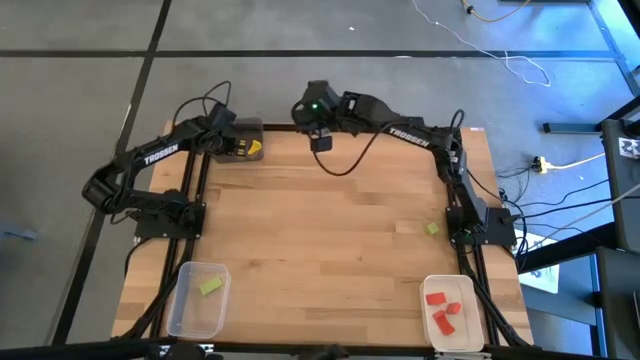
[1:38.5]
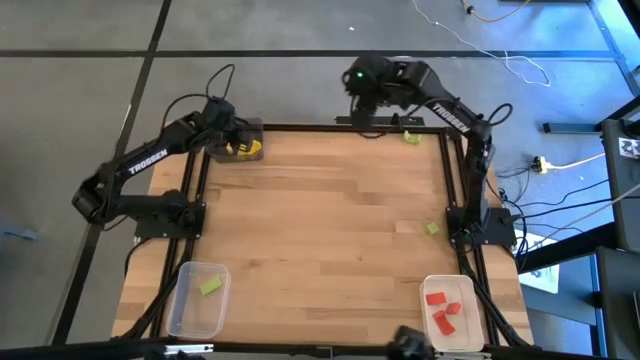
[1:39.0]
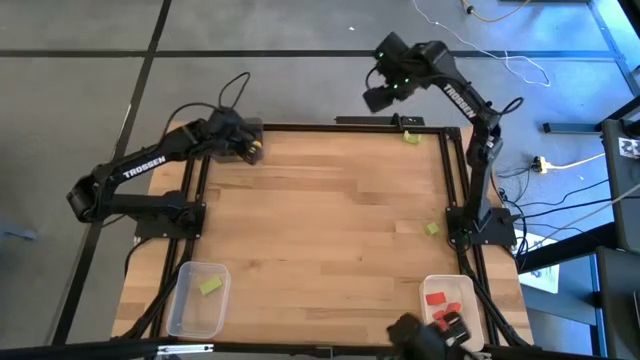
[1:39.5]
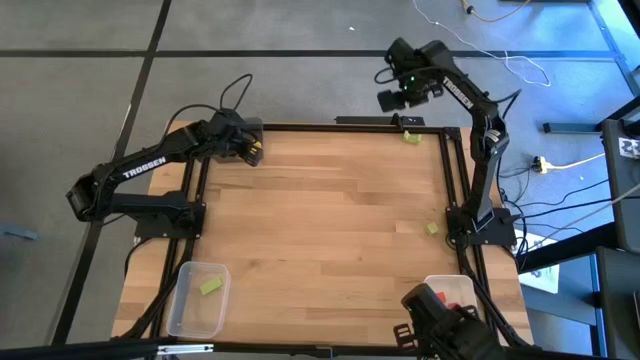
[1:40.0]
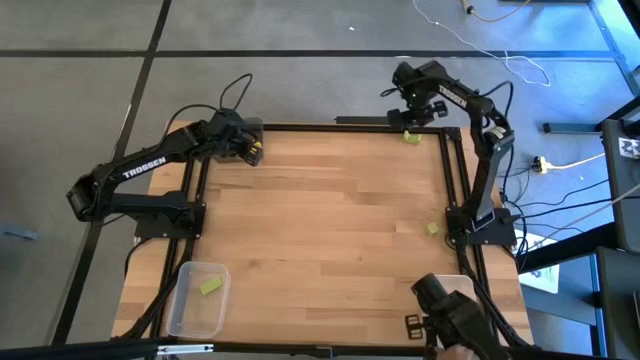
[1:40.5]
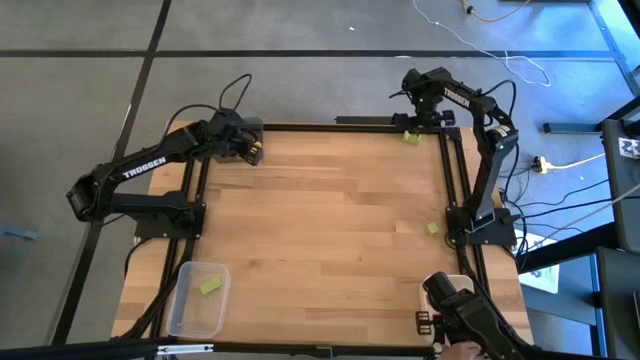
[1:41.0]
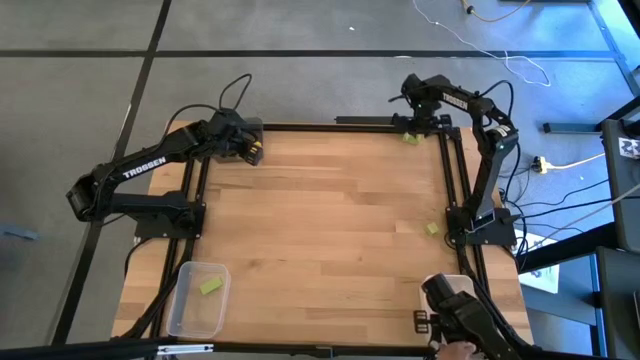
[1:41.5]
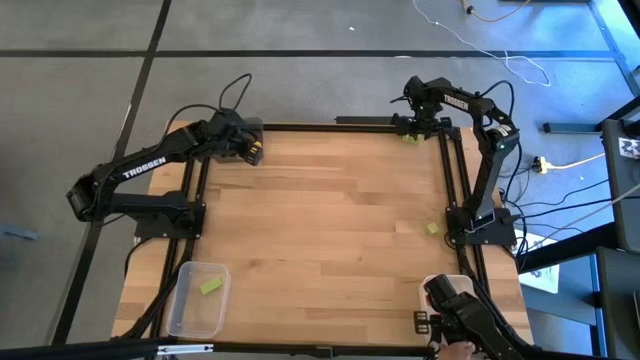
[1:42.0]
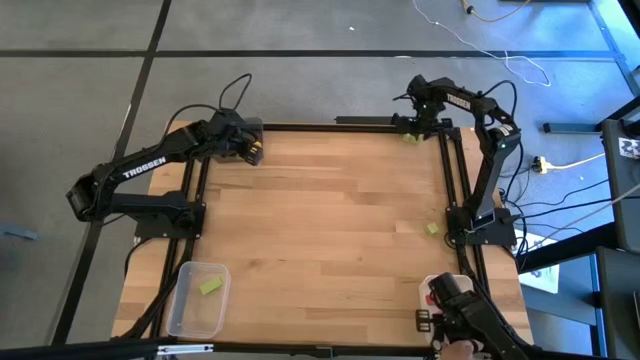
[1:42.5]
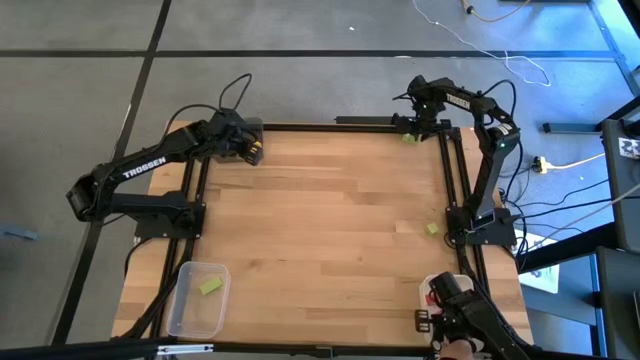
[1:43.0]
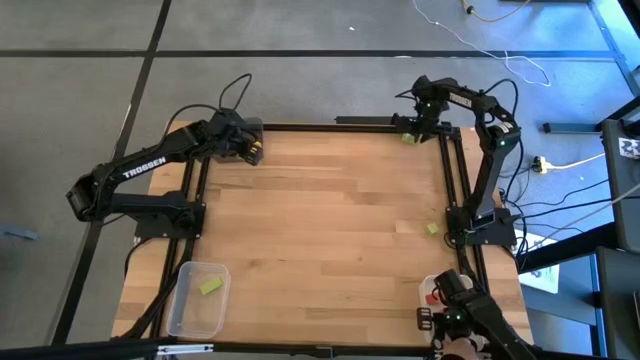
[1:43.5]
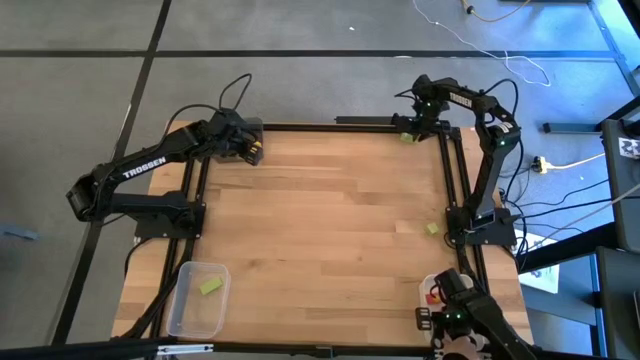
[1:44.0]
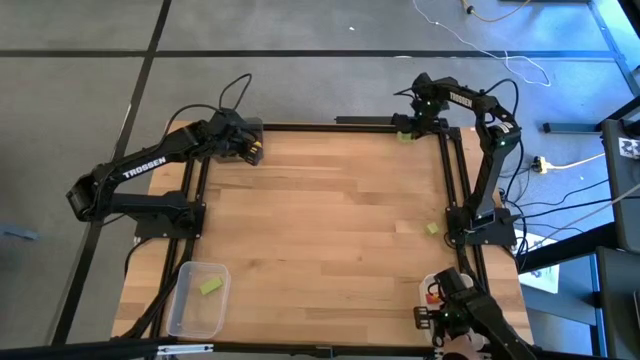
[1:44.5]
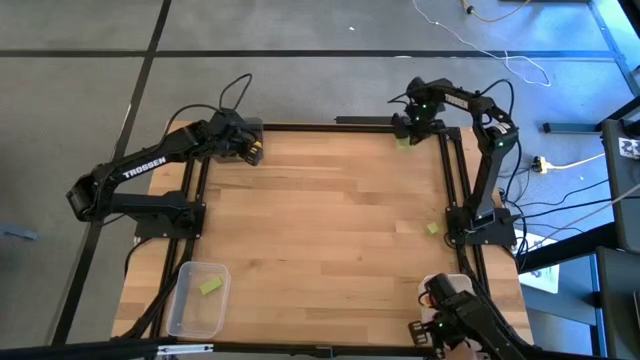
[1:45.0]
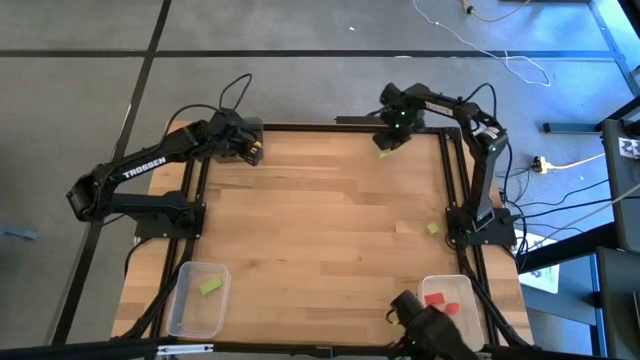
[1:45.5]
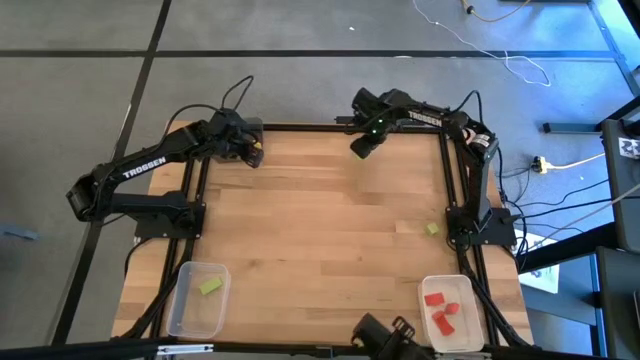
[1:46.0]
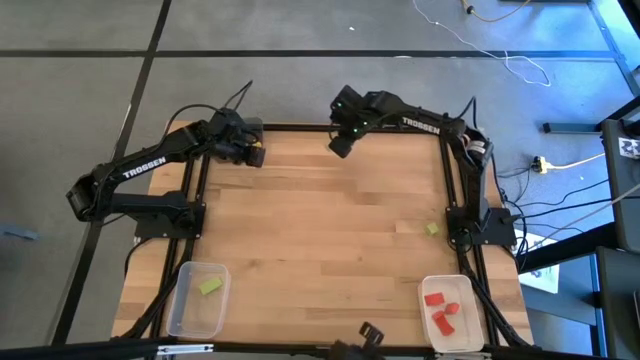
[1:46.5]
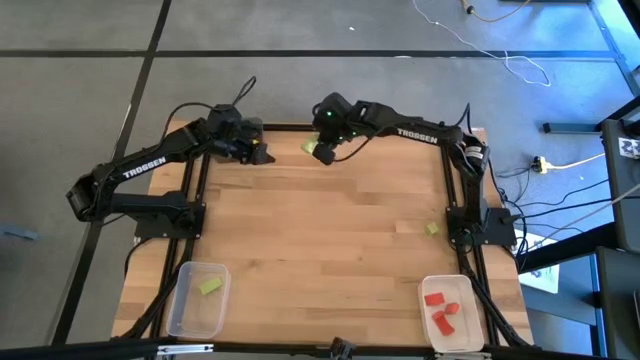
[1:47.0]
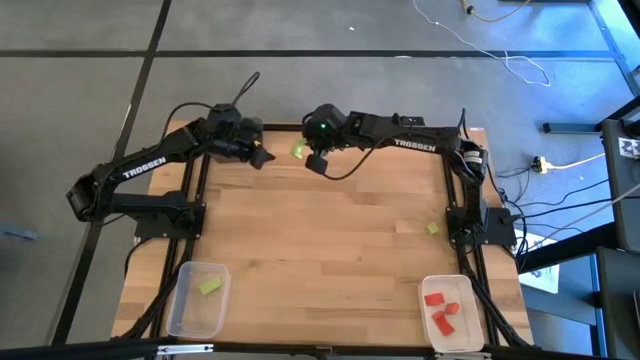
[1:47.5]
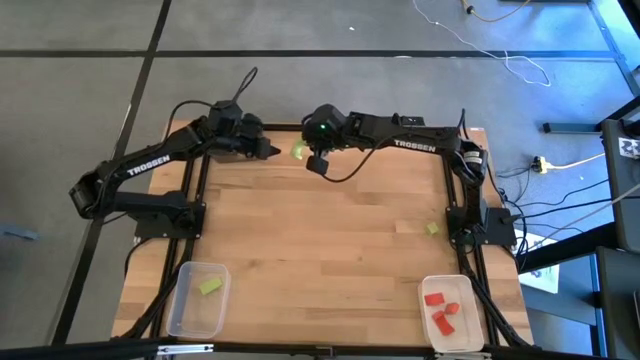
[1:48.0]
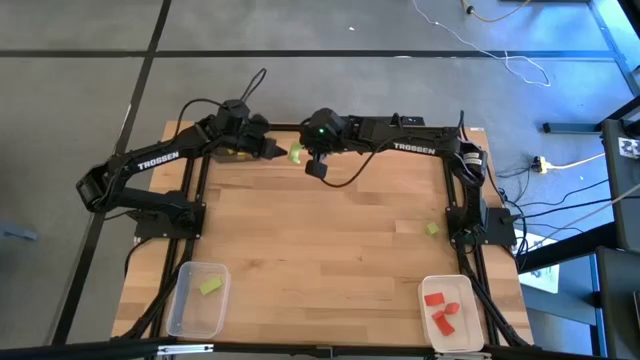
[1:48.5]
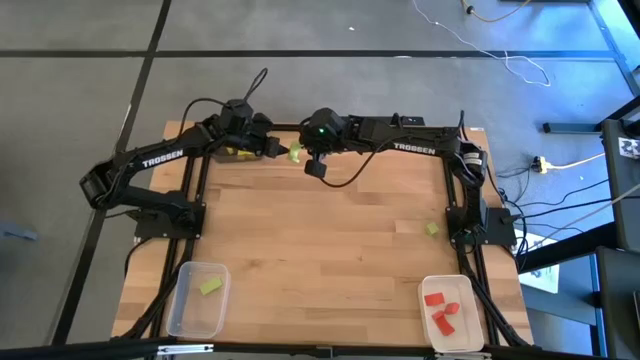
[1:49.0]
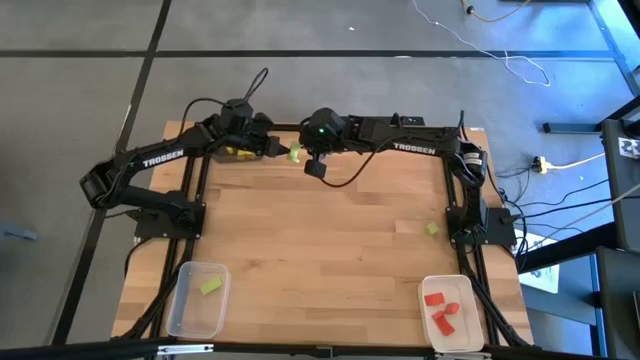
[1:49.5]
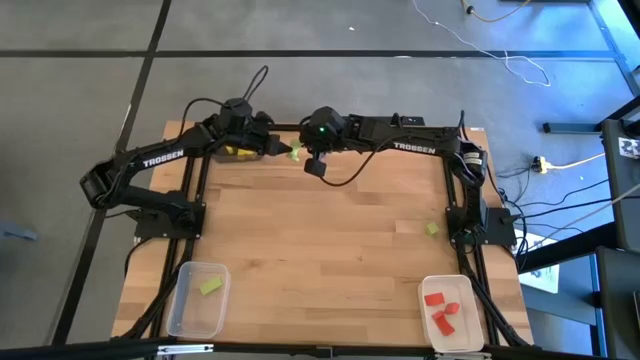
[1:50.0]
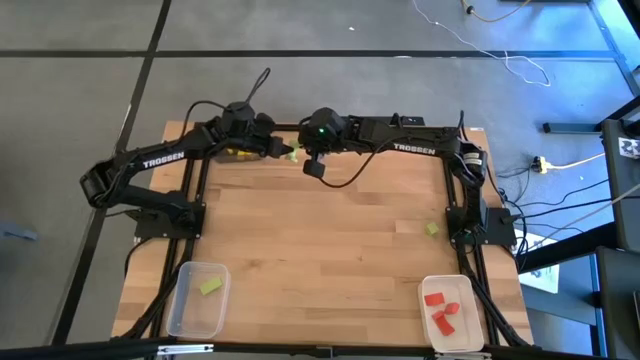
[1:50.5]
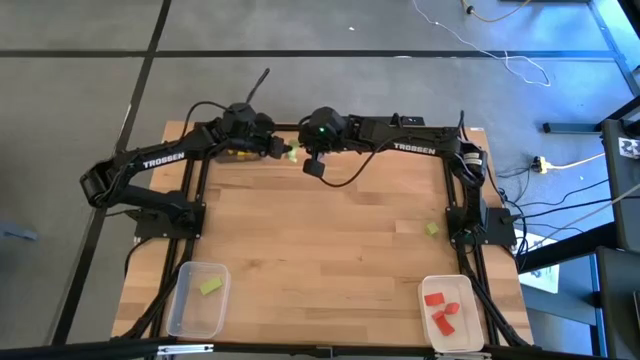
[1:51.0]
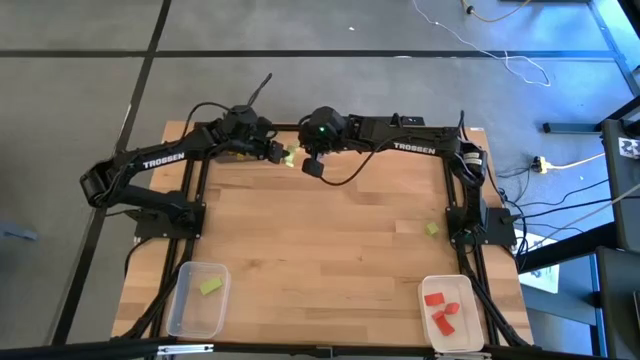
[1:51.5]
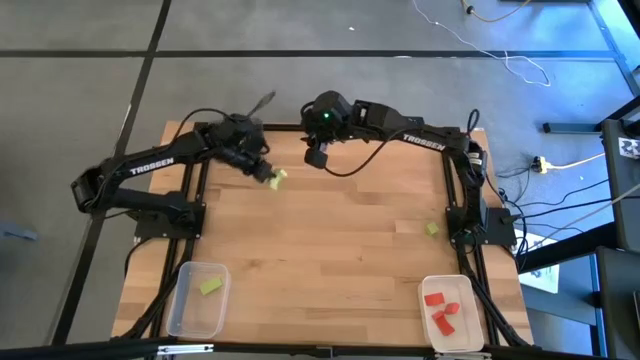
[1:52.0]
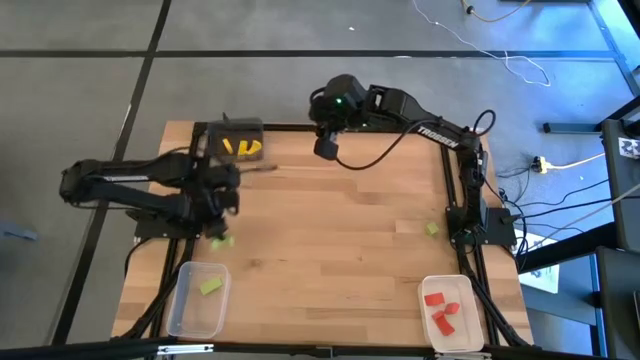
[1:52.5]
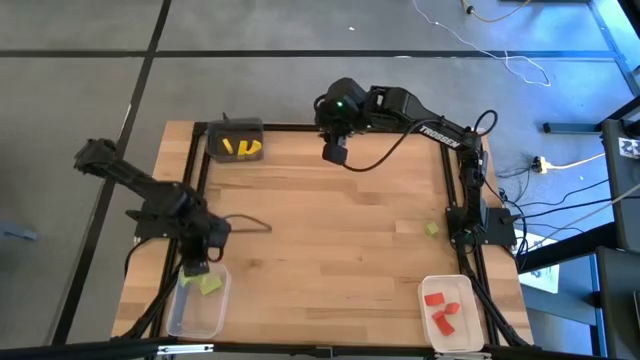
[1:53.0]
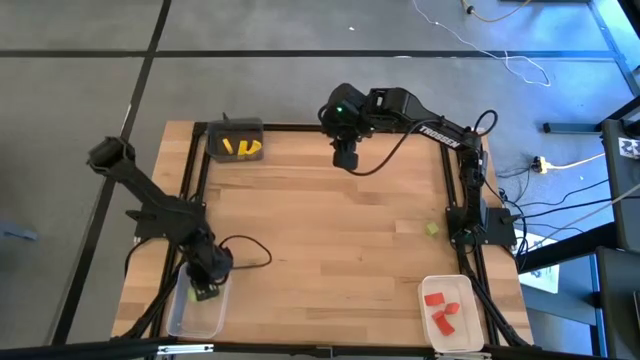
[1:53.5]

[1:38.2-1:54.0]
Task: Sort & place blocks by color
Put the top green block into the transparent bin

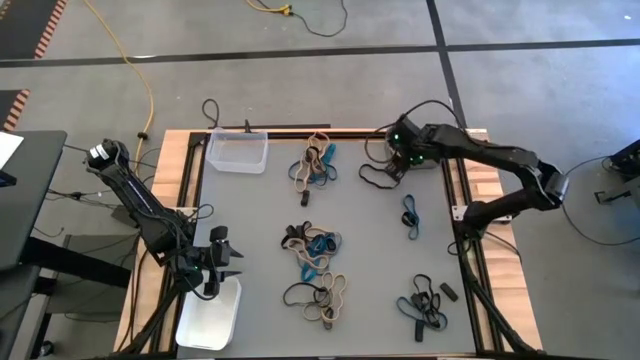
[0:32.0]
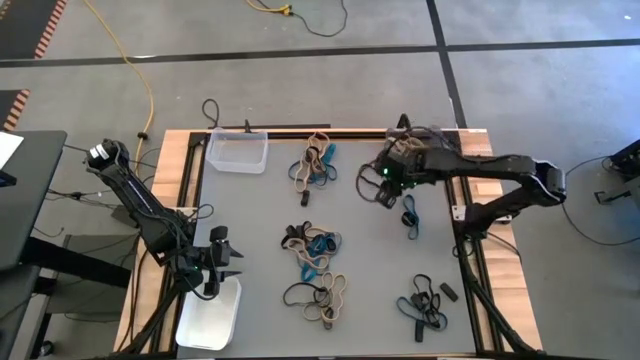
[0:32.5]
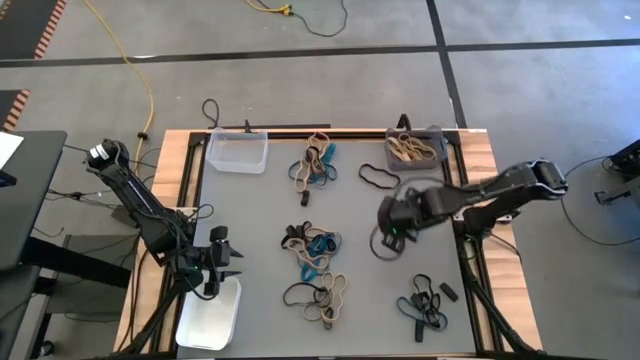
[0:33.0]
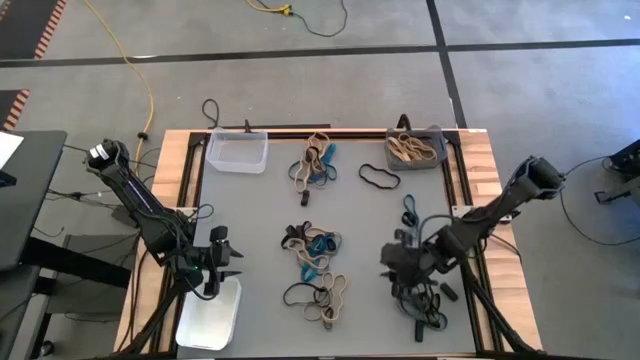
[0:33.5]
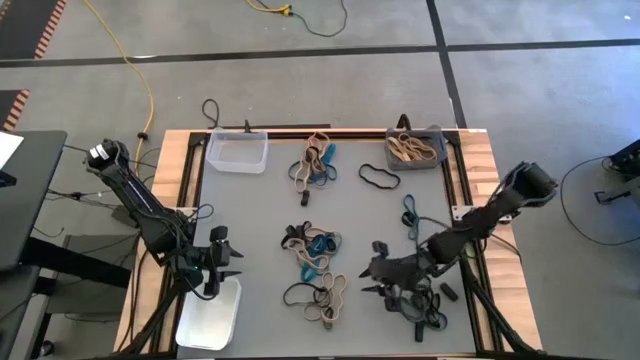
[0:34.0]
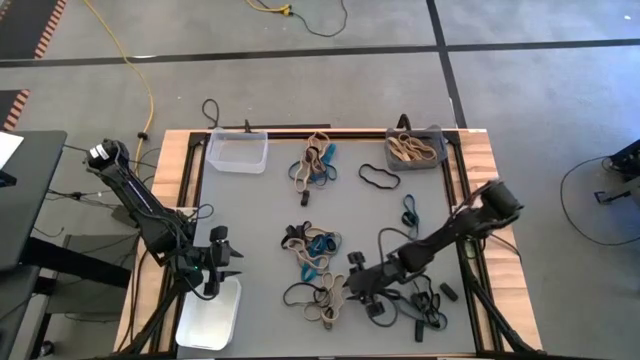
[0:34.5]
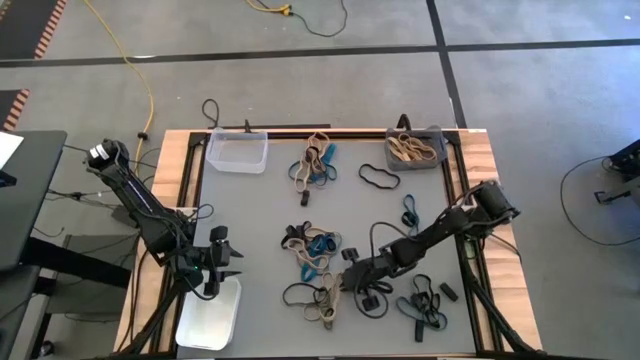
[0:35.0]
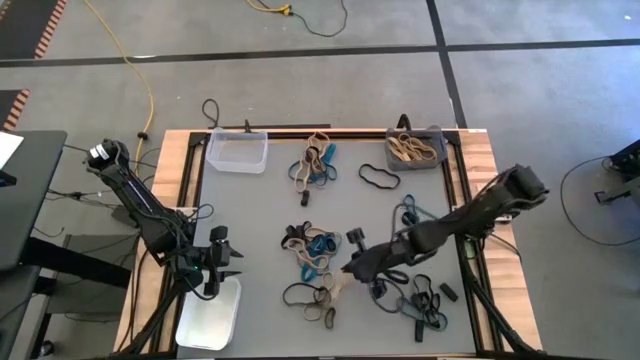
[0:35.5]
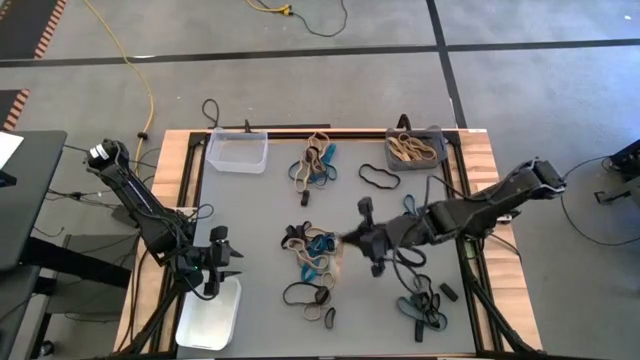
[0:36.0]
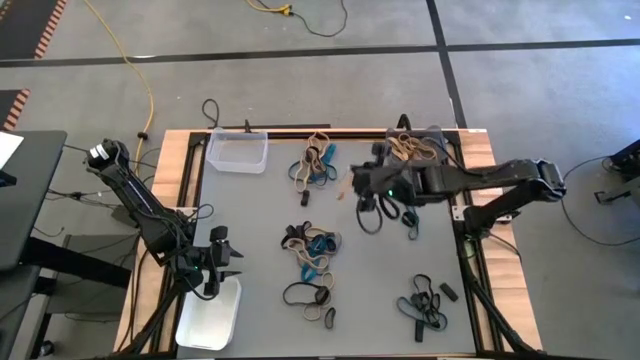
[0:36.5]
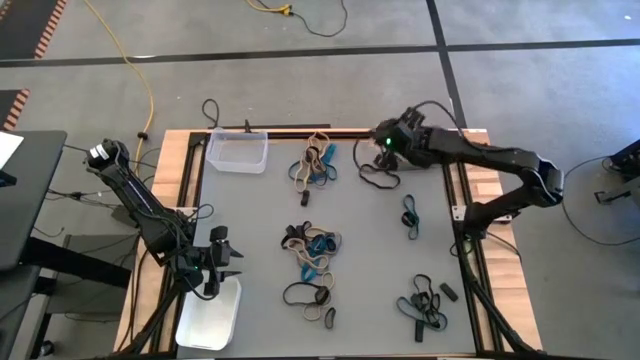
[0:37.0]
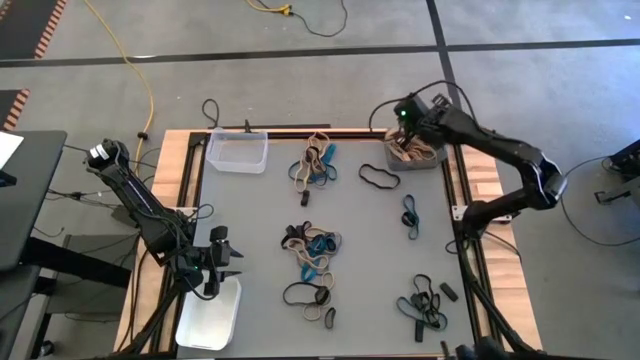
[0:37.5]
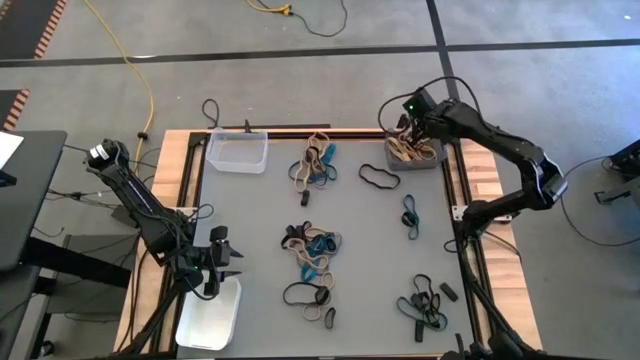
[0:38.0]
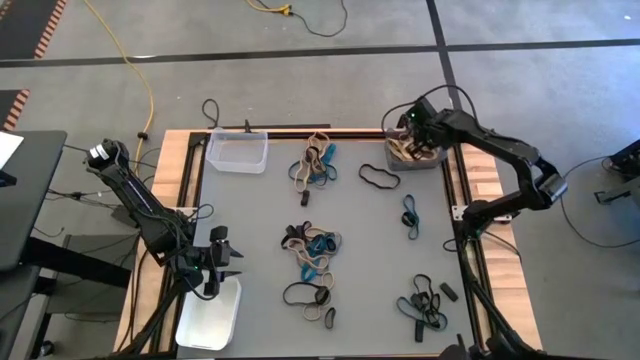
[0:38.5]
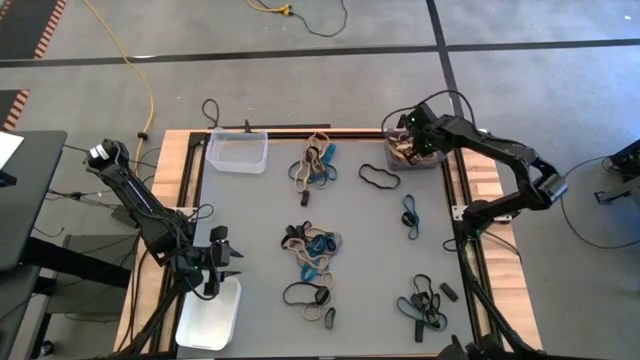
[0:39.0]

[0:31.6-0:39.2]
Task: Sort rubber bands into baskets
Put the white rubber band into the black transparent bin
